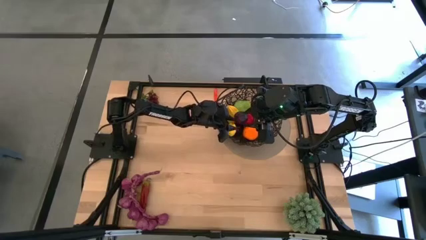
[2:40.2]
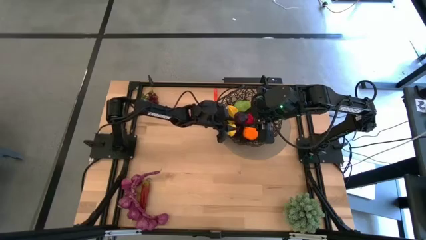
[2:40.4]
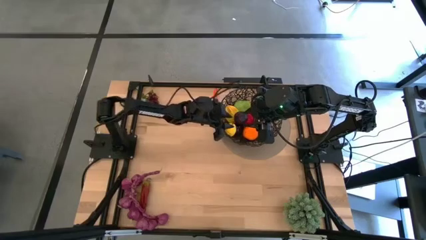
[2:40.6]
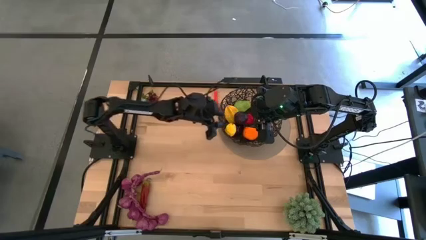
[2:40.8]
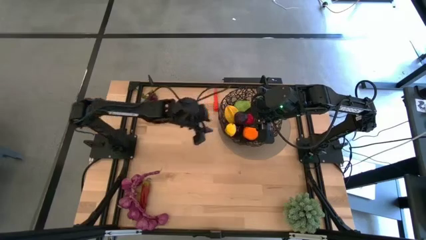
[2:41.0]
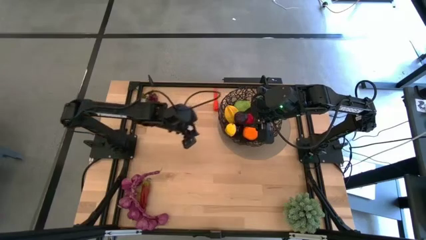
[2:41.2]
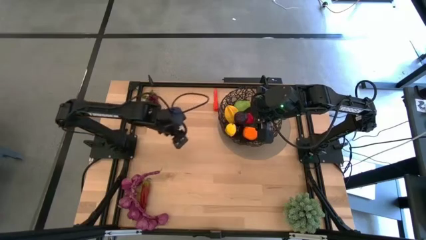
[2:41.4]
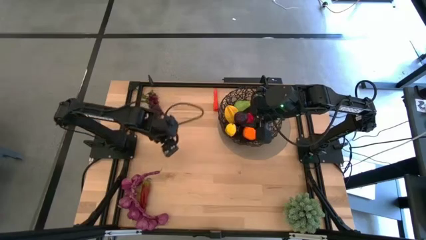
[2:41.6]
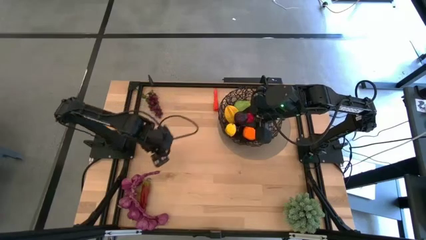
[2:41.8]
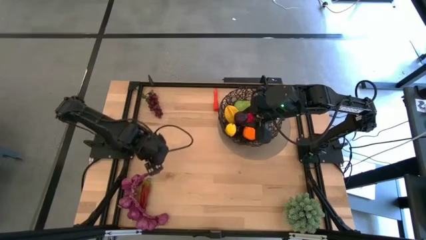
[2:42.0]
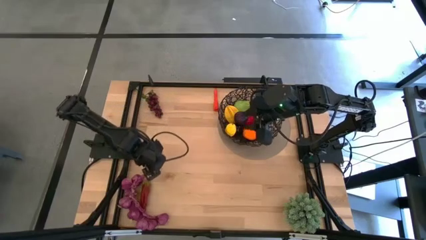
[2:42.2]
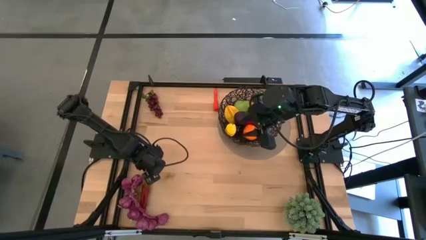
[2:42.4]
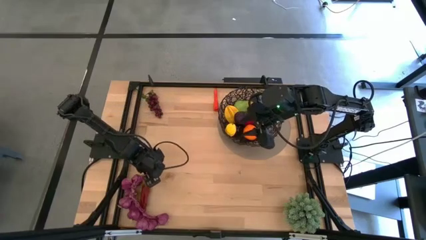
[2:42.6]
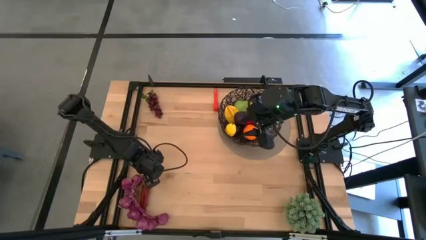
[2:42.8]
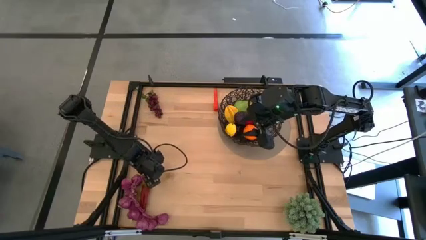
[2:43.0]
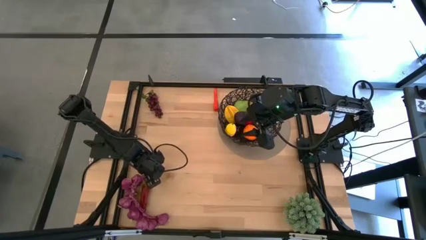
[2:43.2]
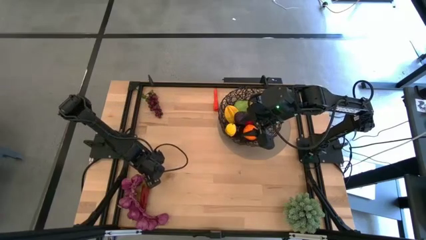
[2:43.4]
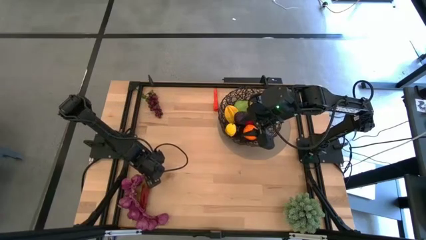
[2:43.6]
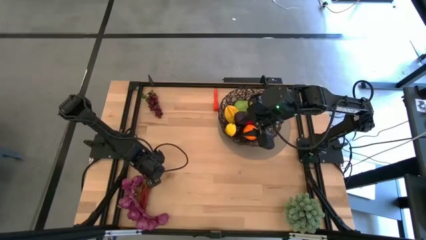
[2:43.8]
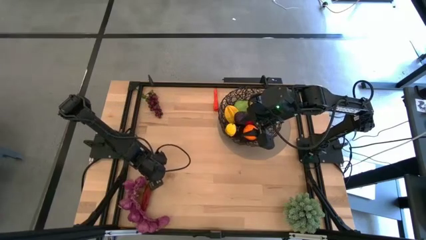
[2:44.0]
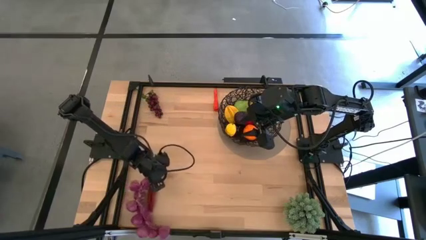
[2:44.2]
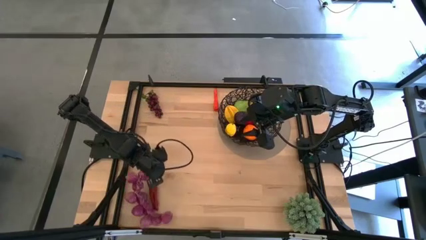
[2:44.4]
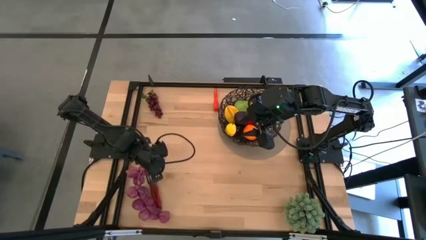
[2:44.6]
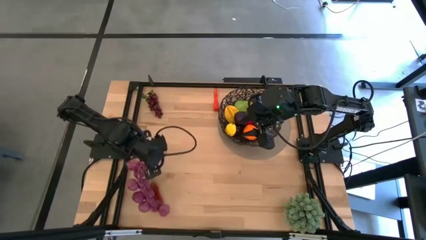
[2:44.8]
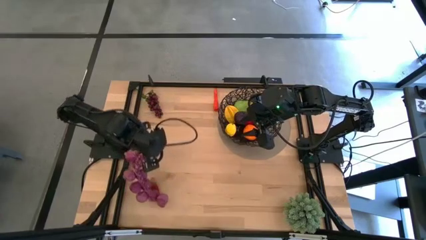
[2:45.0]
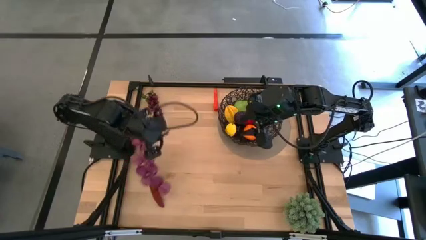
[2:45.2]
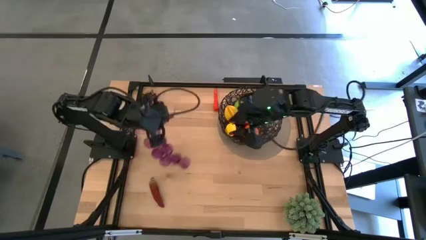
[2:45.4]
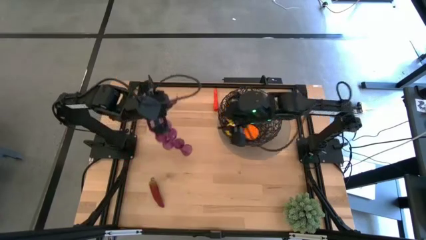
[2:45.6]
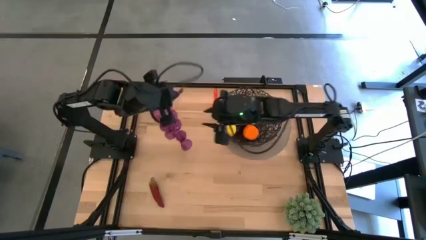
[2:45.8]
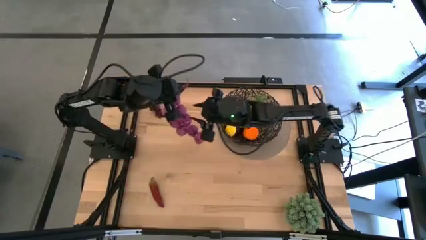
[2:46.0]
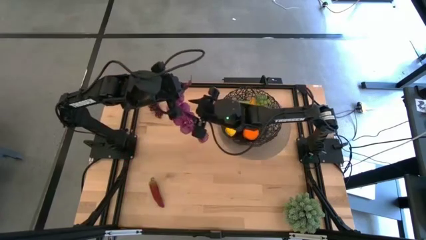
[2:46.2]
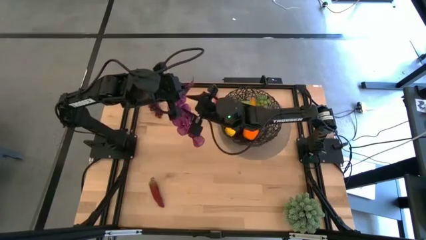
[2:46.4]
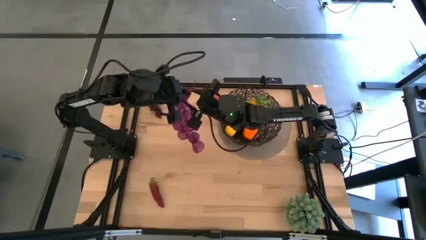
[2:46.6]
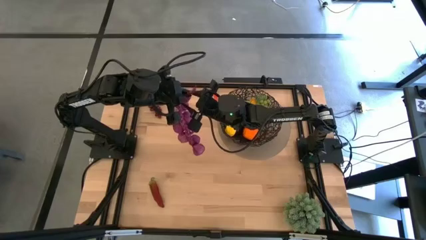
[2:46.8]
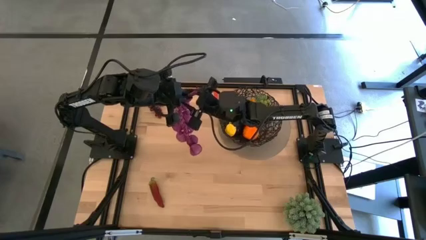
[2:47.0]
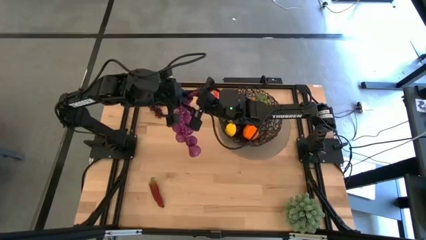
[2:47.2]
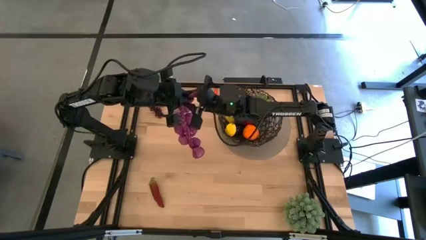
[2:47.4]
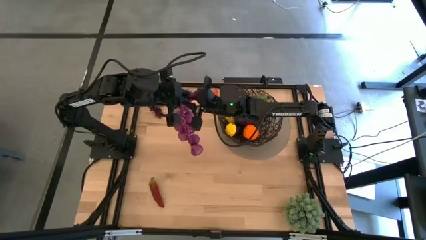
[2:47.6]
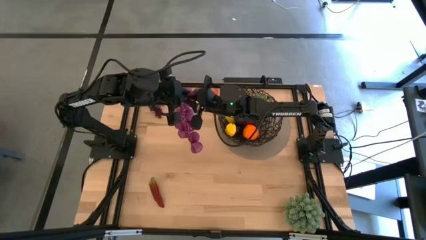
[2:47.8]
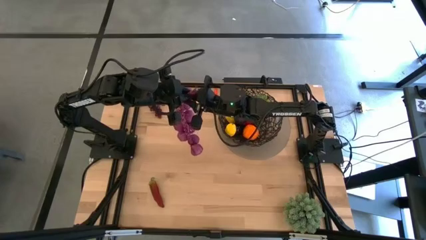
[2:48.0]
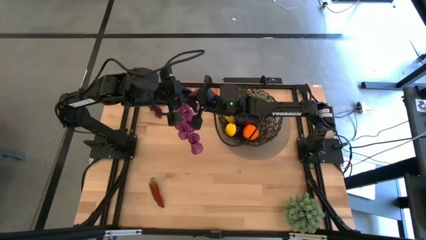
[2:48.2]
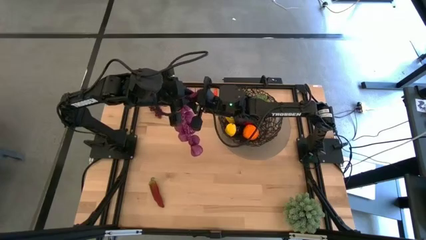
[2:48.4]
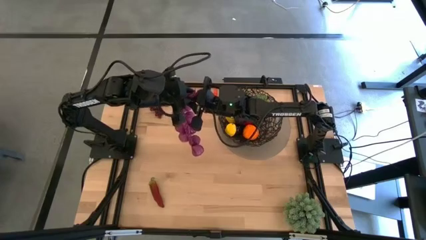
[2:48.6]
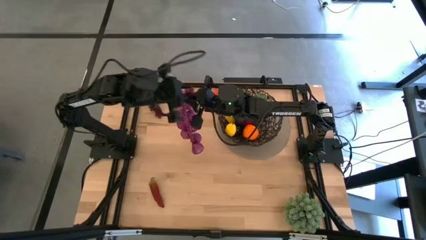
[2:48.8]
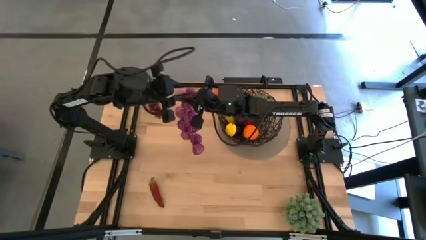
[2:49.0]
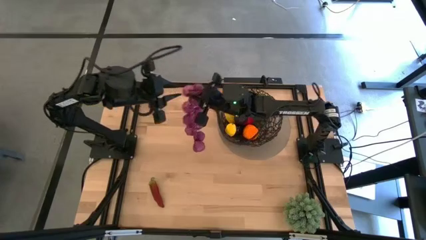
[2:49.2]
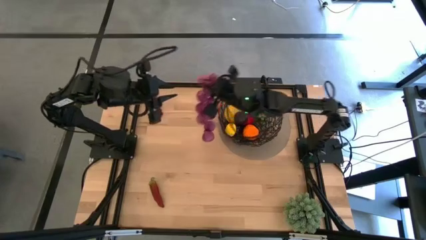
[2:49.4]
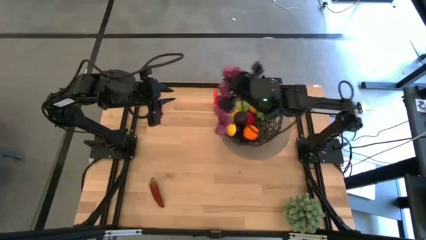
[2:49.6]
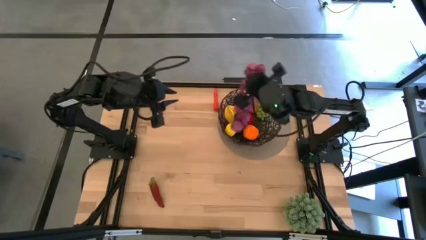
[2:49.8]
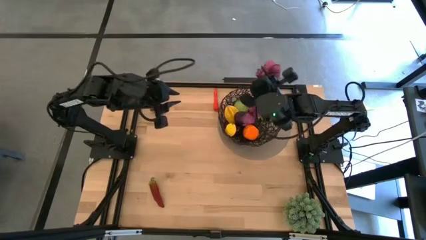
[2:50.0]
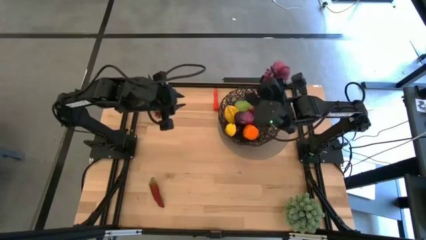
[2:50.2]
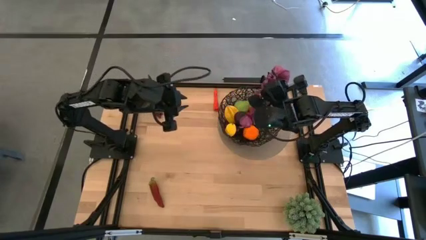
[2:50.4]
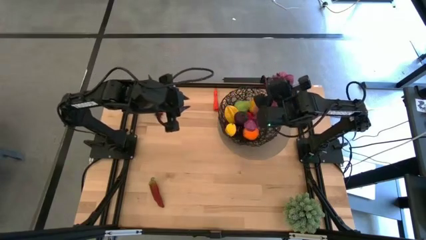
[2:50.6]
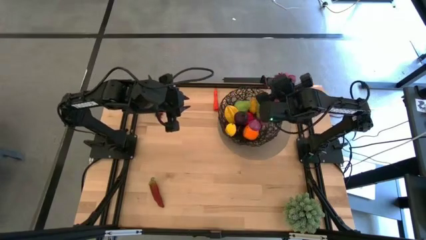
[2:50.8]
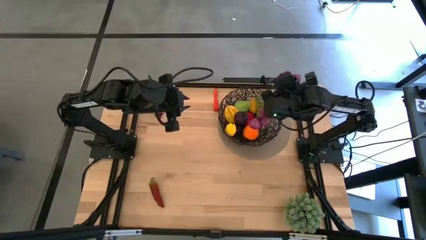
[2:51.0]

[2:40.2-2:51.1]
Task: Build produce basket
Put the purple garlic into the black wire basket

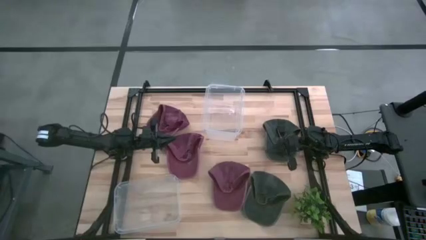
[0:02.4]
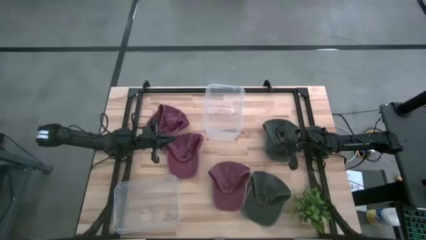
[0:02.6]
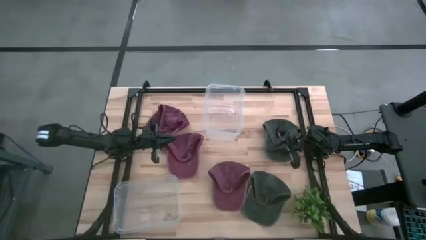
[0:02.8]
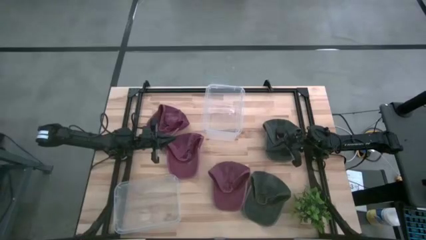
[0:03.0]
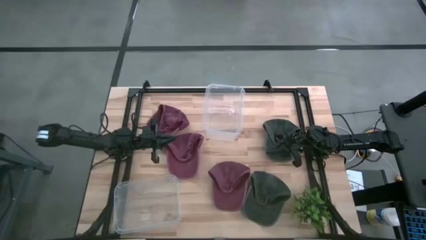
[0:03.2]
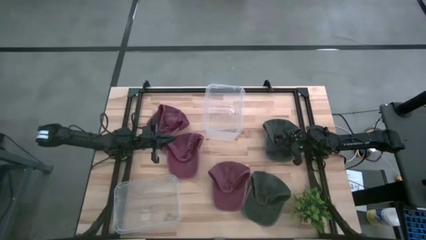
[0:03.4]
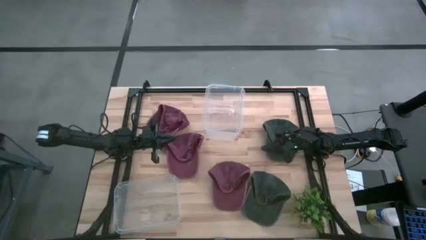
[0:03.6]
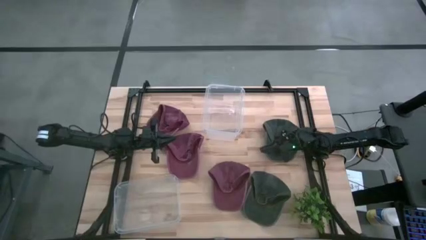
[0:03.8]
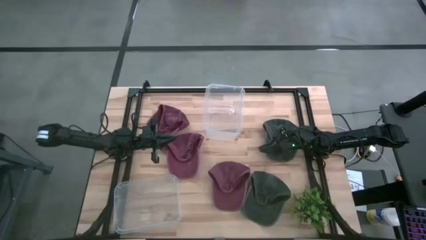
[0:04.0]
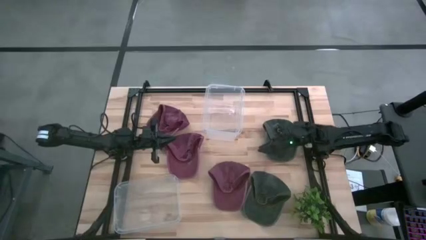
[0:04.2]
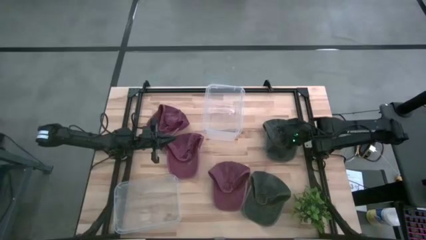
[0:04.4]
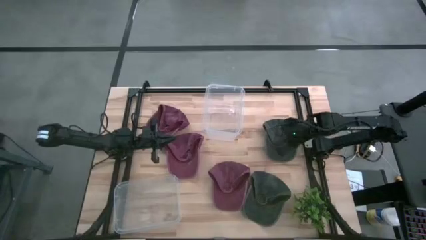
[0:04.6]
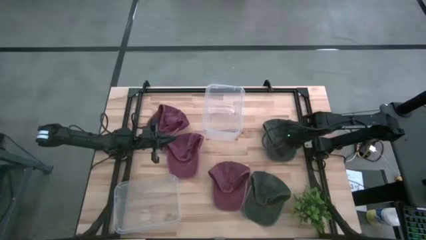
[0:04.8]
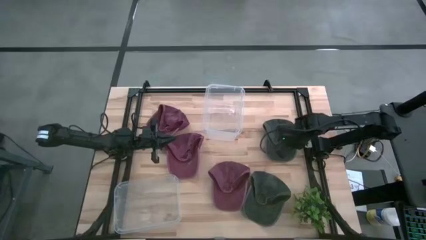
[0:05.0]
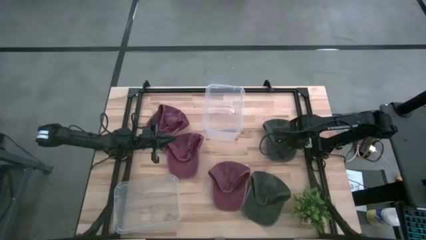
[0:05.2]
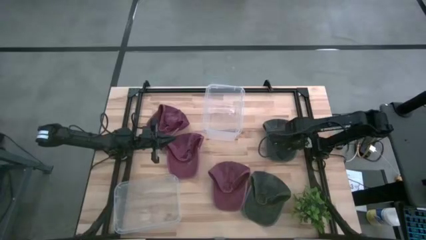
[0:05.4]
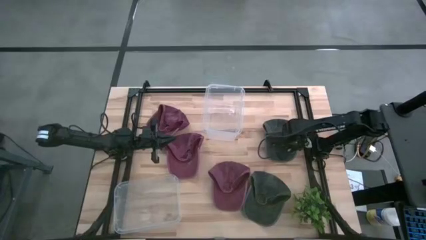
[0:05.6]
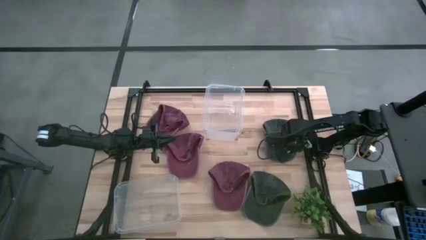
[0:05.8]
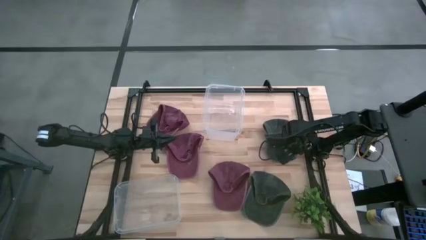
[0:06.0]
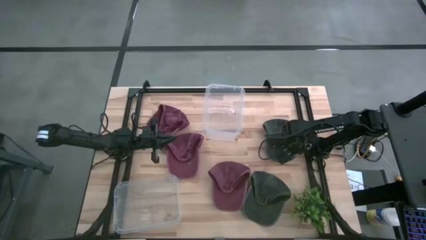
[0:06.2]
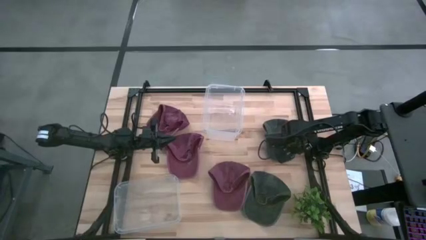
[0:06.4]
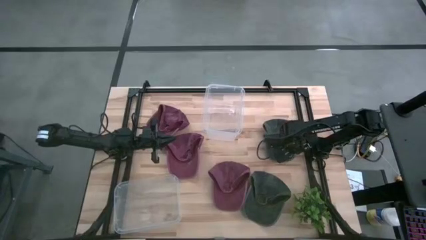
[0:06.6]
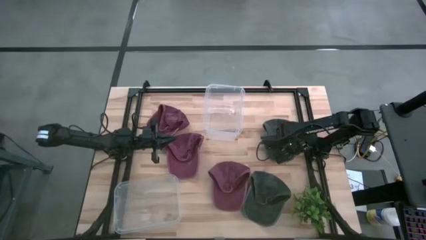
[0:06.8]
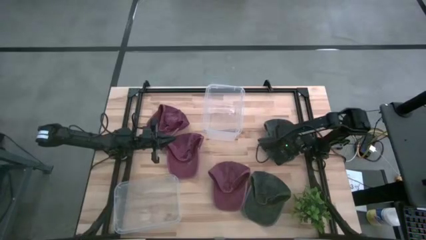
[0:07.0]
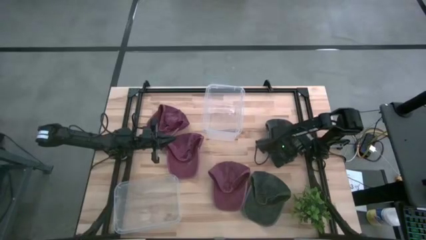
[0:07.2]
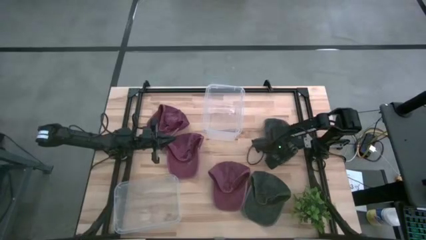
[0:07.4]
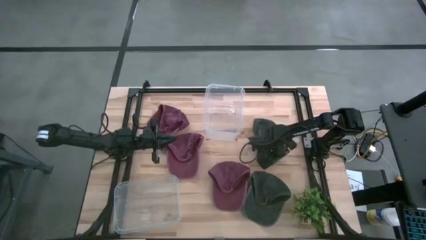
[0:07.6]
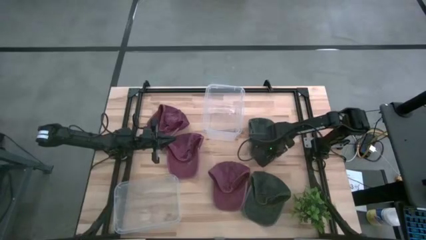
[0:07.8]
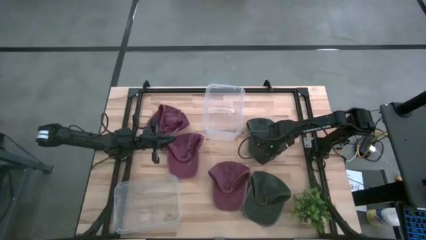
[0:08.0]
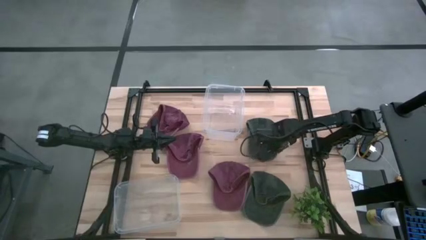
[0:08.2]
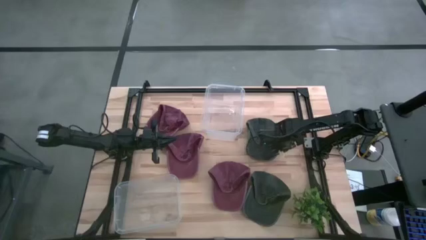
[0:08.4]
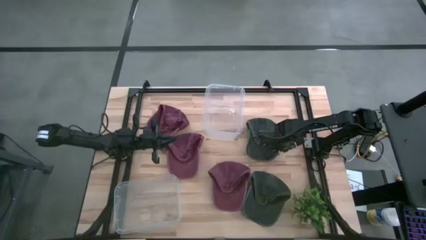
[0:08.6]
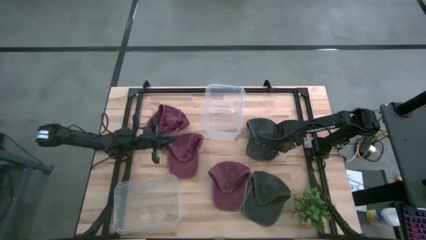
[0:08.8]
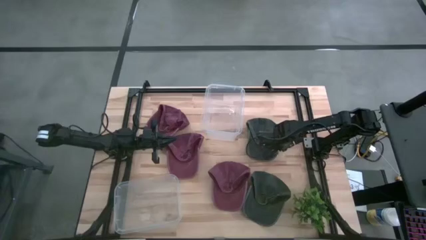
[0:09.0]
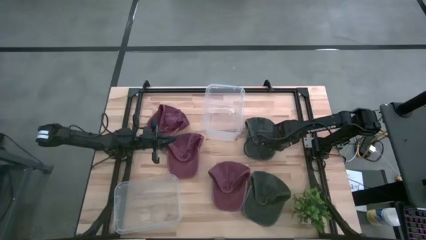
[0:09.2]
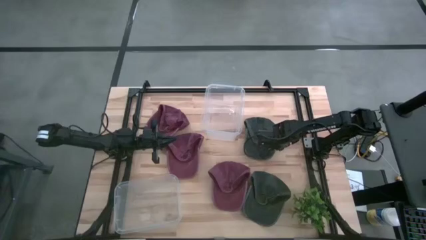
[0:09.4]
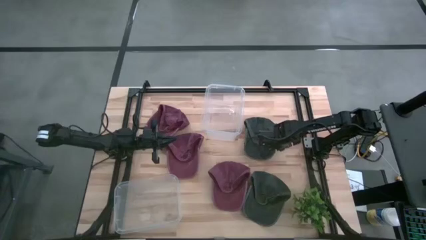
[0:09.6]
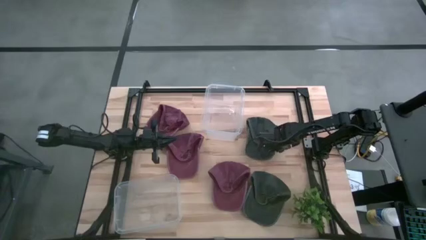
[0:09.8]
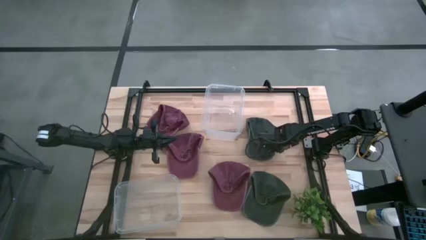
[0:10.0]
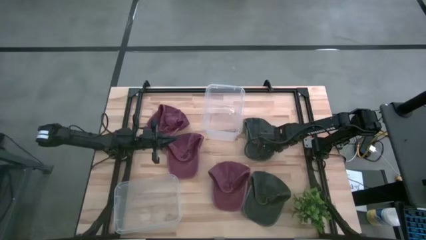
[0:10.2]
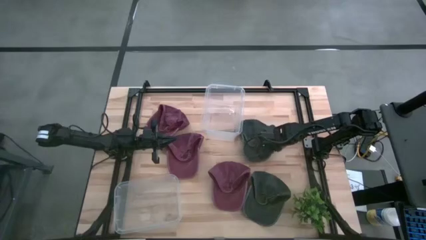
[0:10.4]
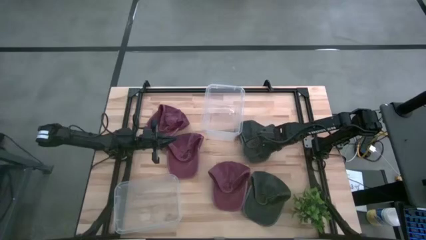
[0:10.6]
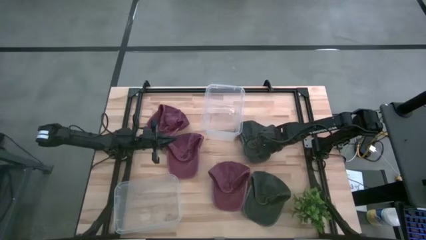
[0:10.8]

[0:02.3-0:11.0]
Task: Pick and place caps into container
Put the top green cap into the top transparent container
